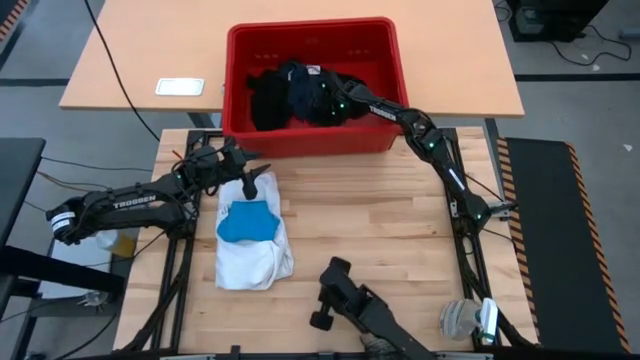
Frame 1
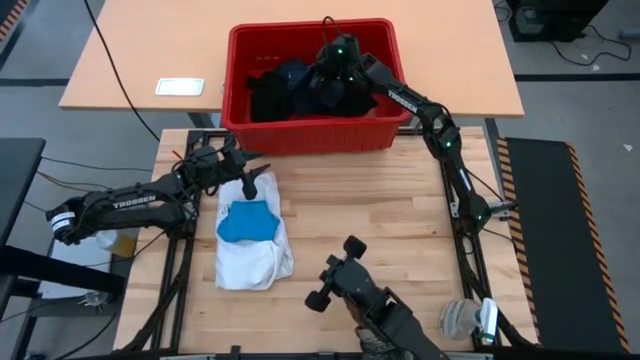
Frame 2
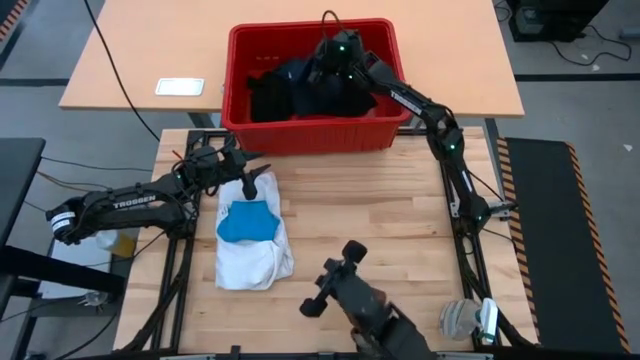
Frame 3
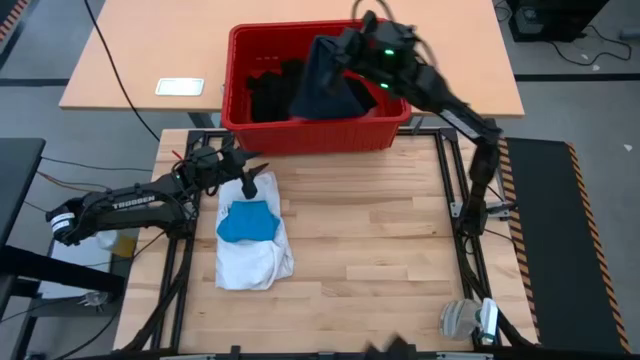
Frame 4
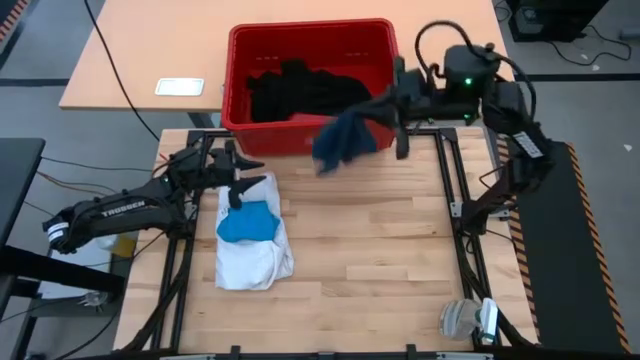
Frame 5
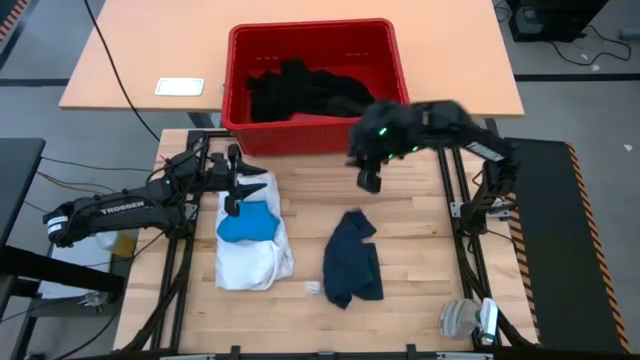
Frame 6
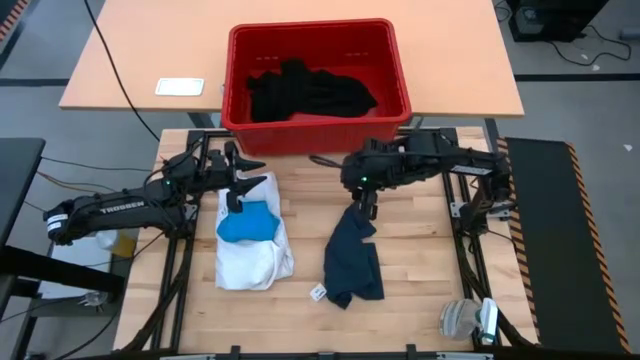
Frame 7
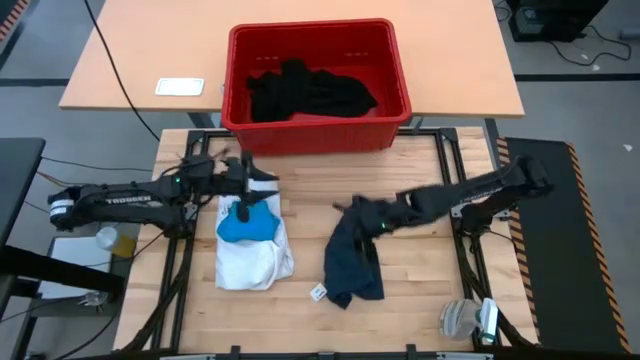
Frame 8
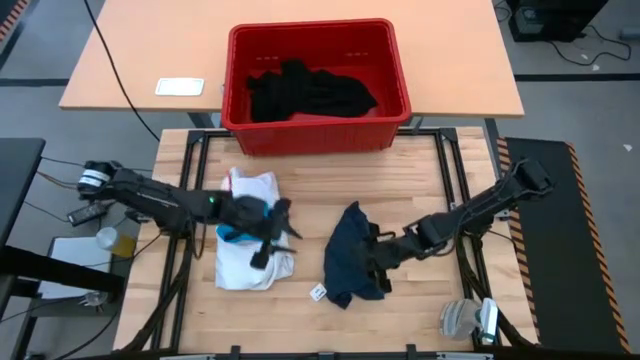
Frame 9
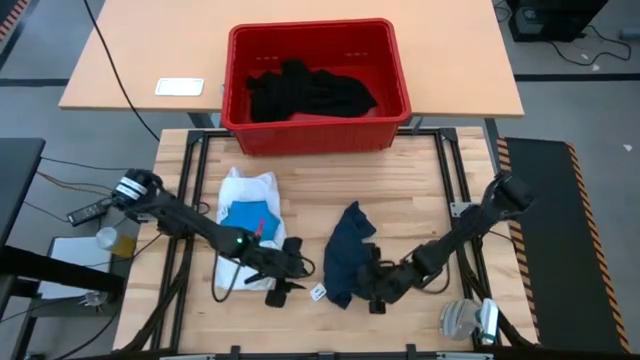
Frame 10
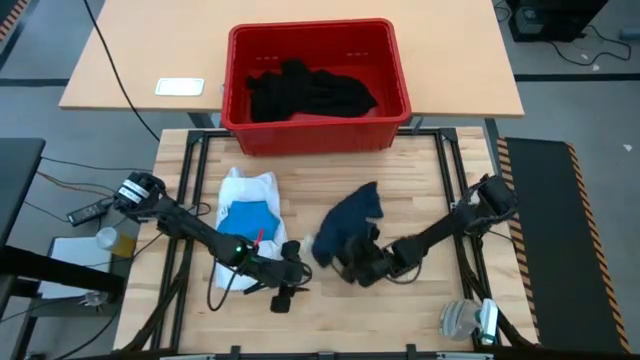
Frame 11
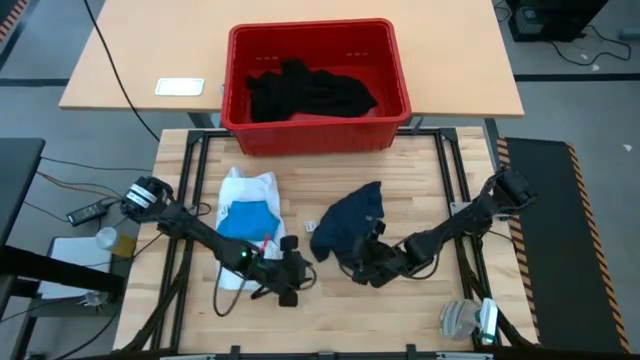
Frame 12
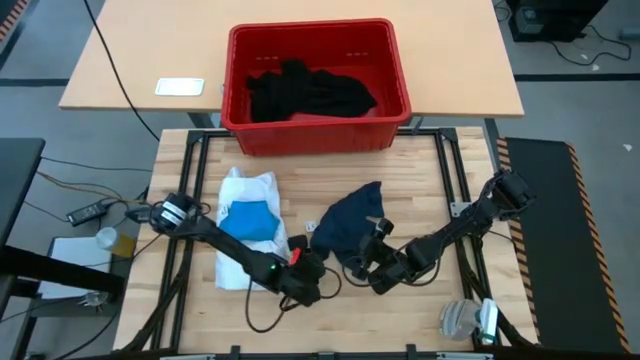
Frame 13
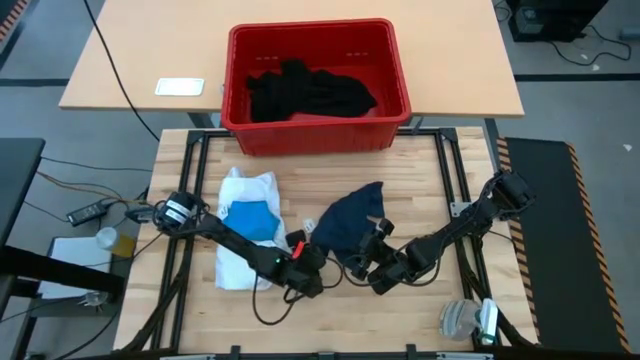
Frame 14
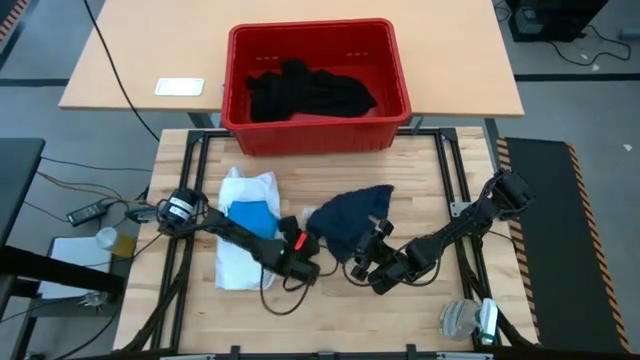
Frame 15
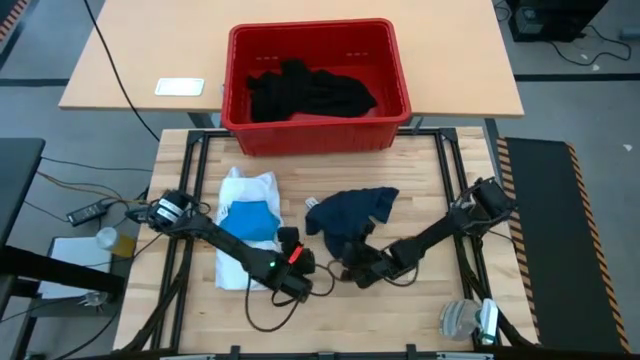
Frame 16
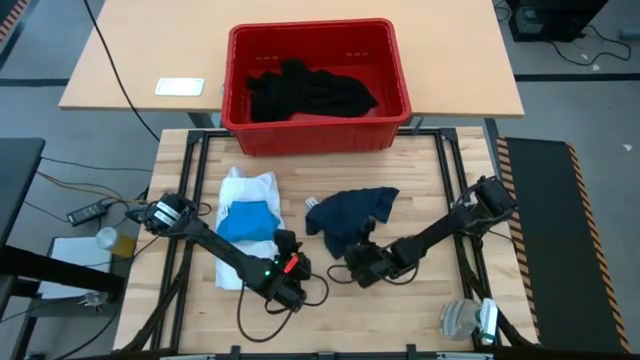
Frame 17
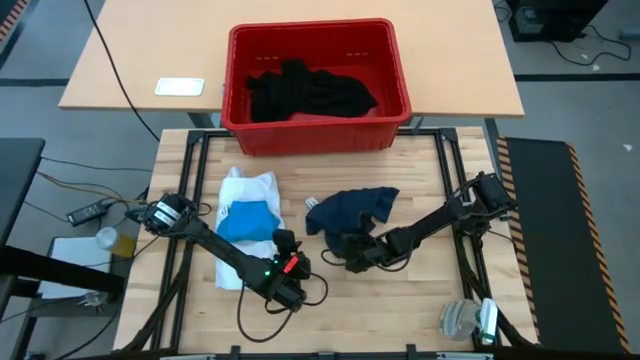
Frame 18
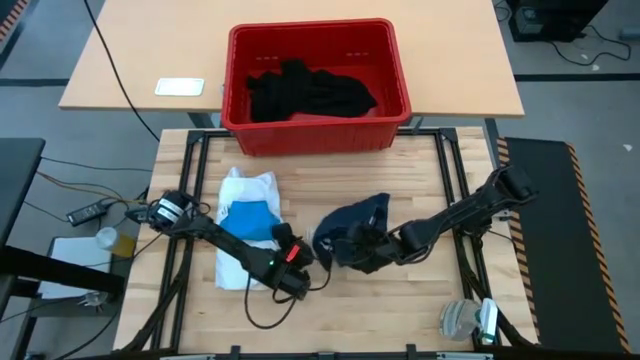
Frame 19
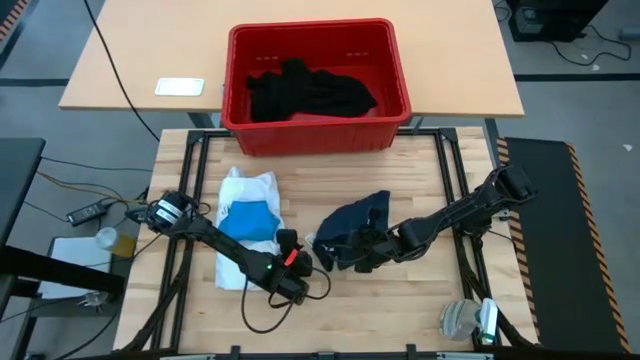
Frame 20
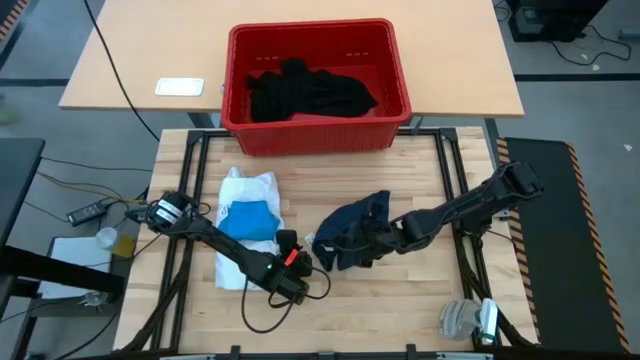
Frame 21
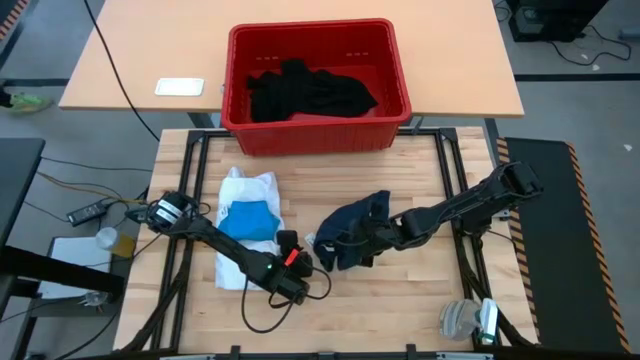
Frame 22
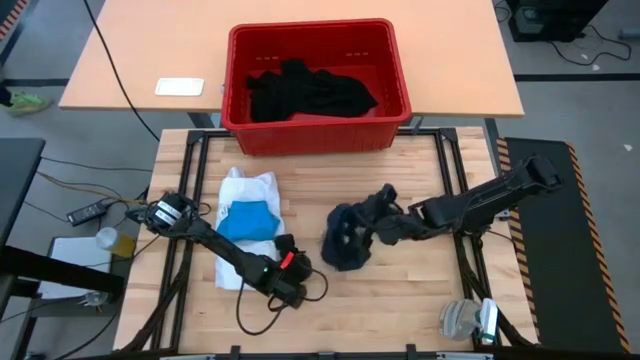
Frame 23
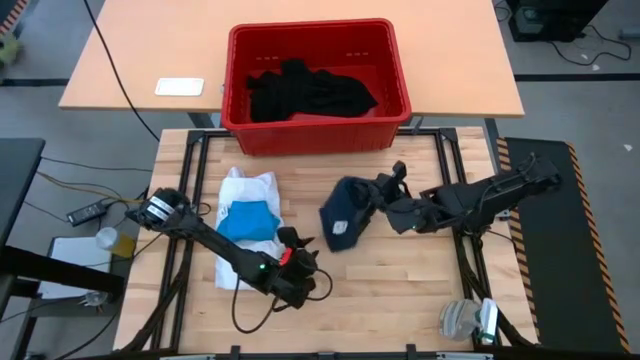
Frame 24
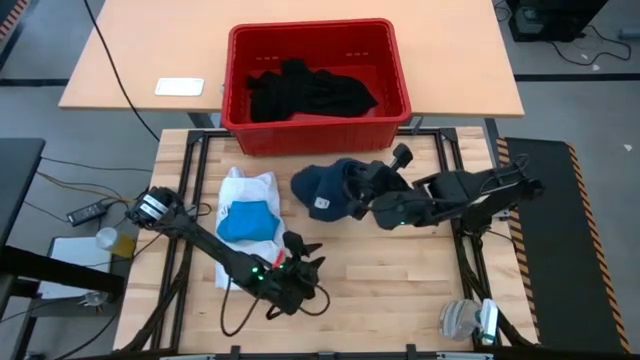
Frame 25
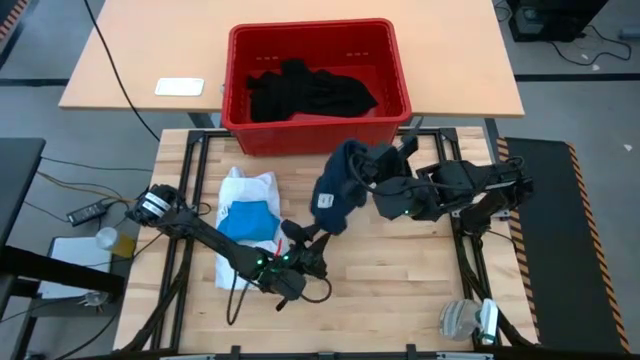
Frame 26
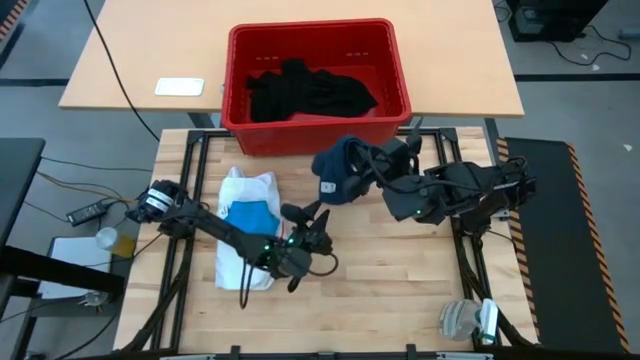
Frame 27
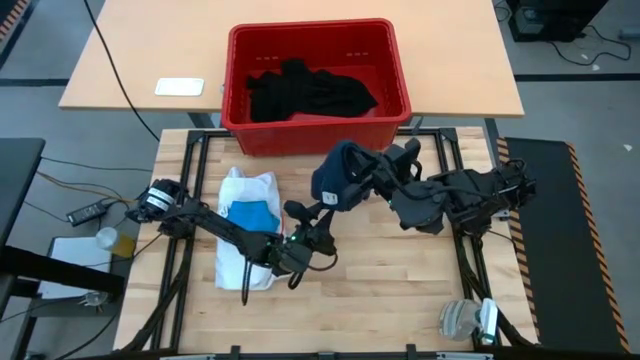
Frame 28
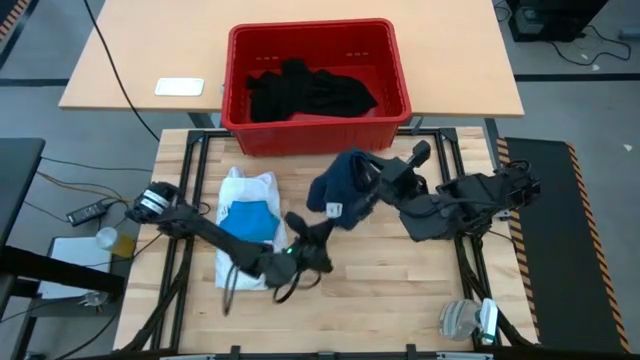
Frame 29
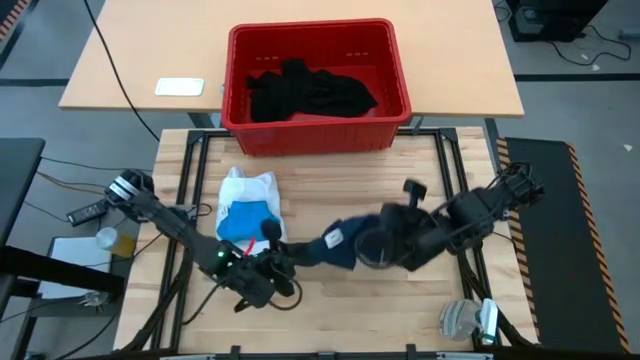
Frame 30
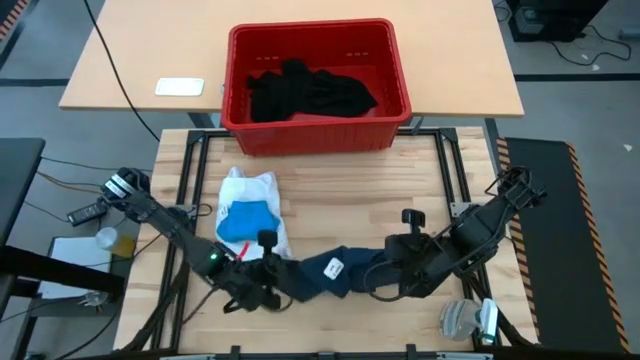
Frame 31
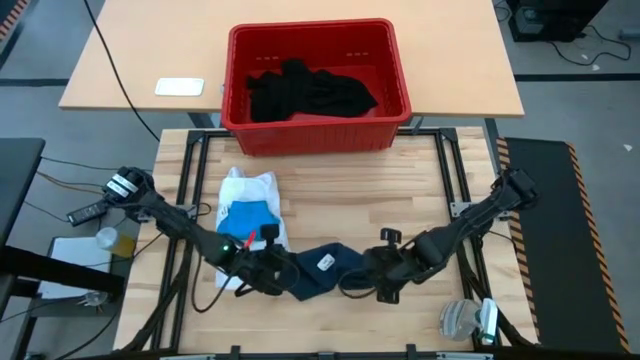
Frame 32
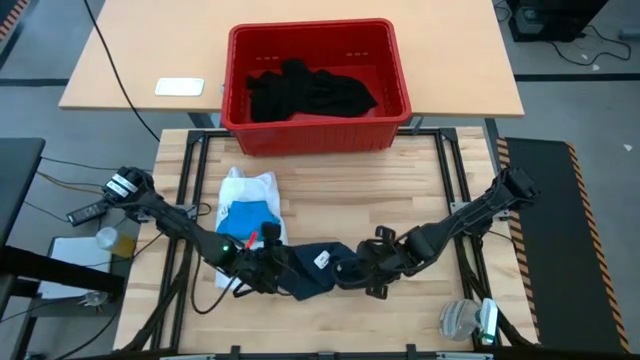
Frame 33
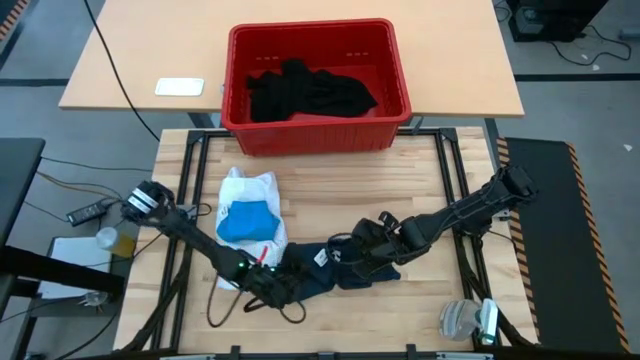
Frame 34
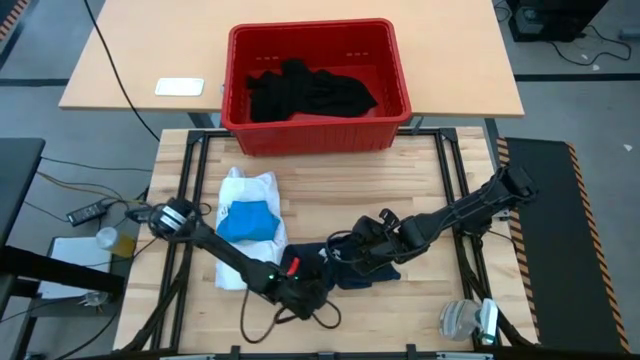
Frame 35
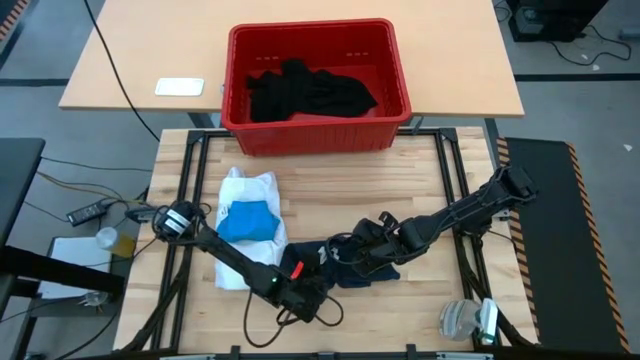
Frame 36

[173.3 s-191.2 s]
Task: Fold laundry
Fold the dark blue underwear

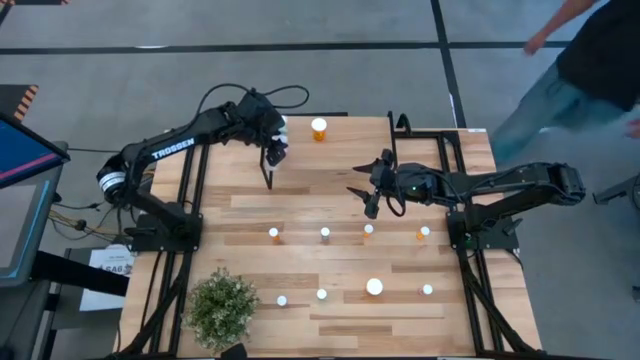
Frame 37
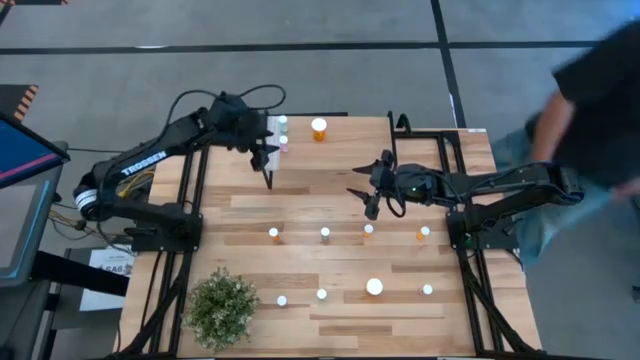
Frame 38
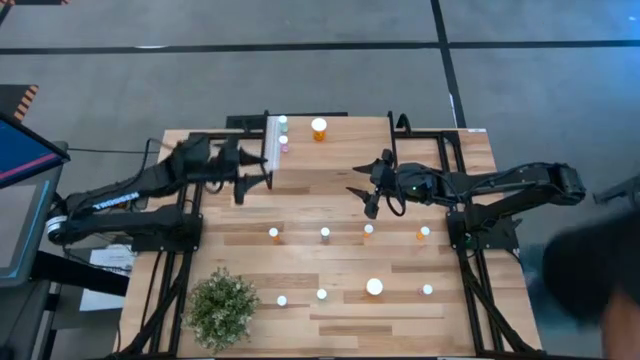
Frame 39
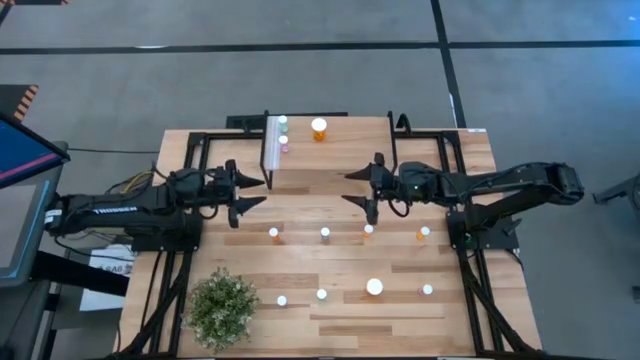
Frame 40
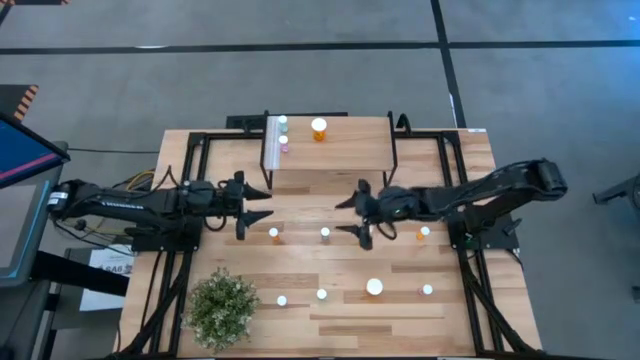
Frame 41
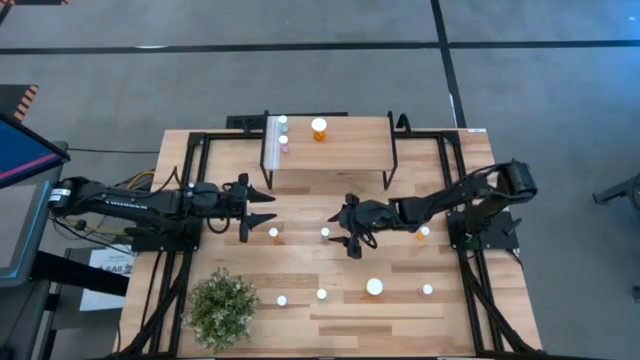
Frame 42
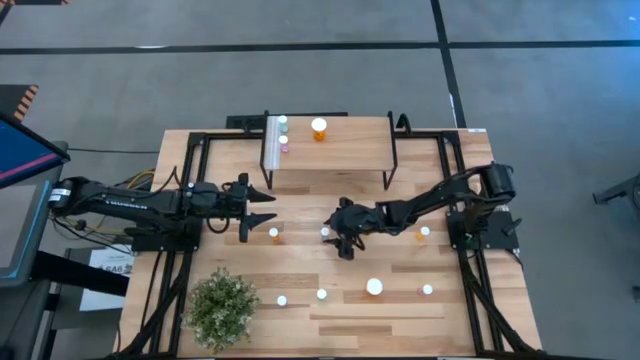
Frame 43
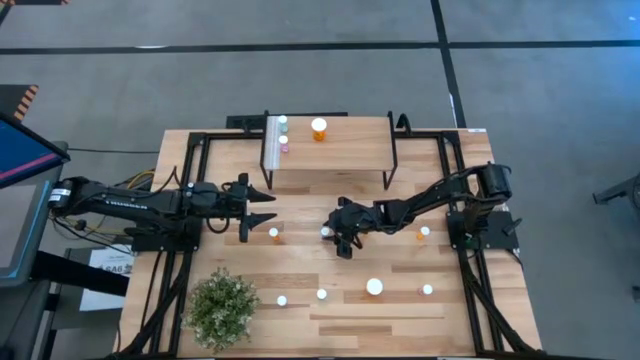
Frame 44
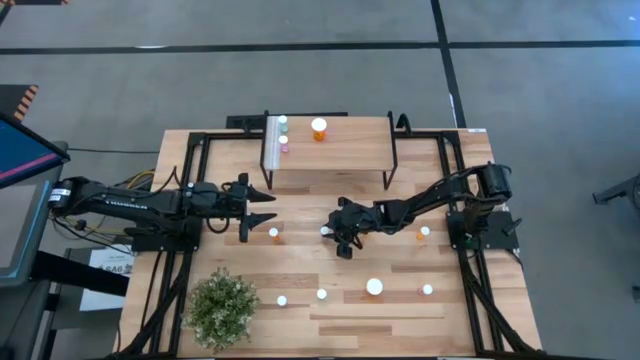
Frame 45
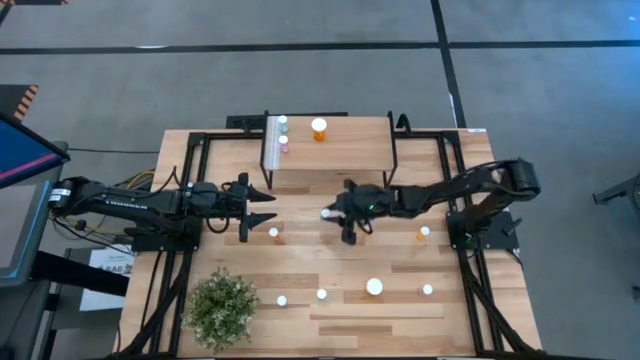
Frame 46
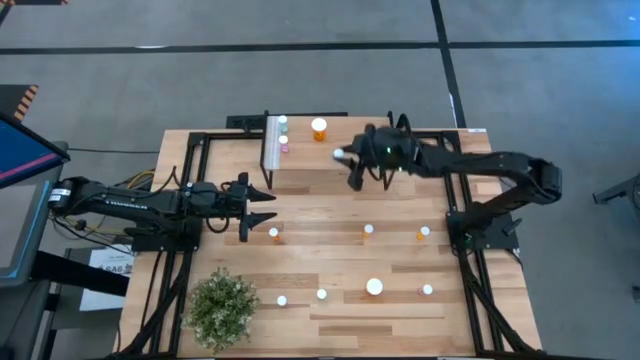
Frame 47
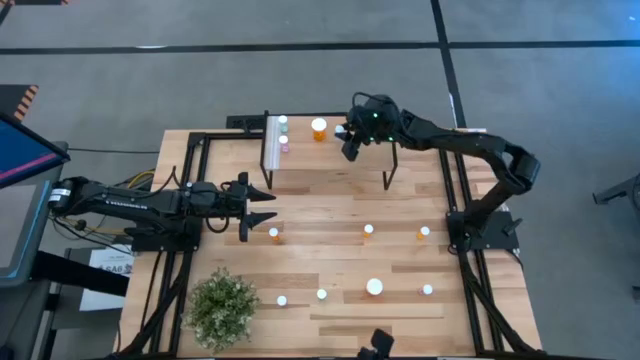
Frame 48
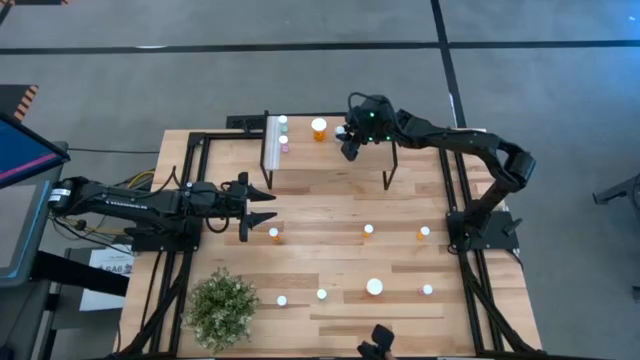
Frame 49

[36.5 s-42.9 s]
Task: Pick and place medicine bottles onto shelf by color
Put the top blue pill bottle on the shelf
